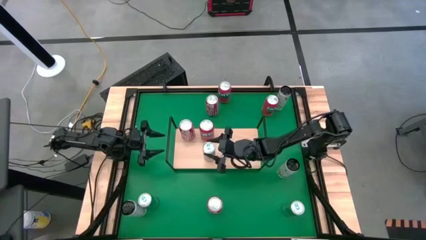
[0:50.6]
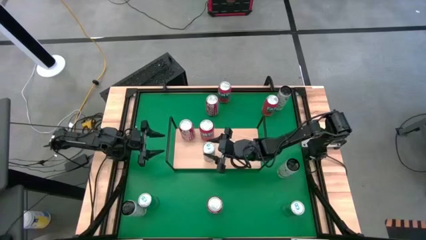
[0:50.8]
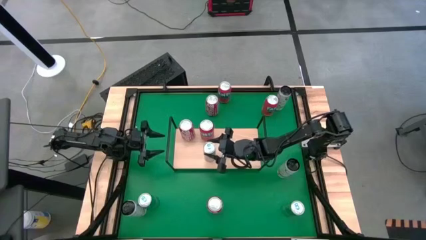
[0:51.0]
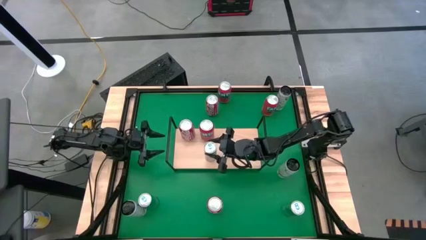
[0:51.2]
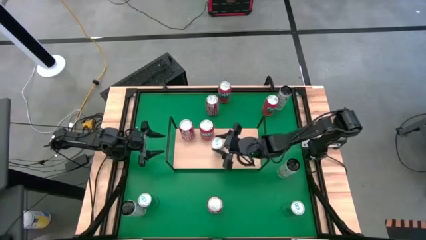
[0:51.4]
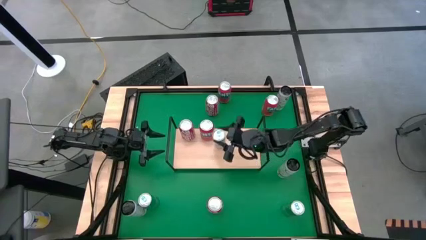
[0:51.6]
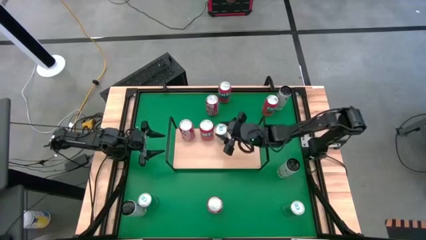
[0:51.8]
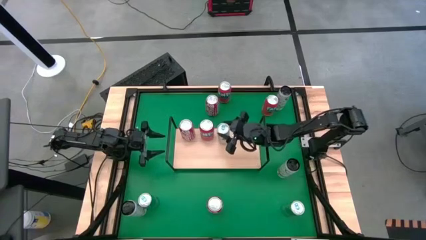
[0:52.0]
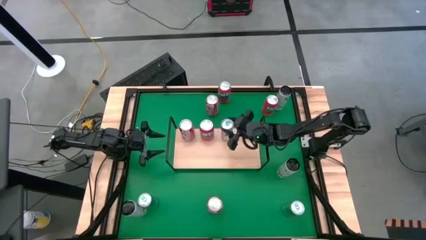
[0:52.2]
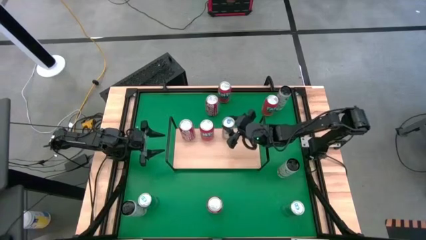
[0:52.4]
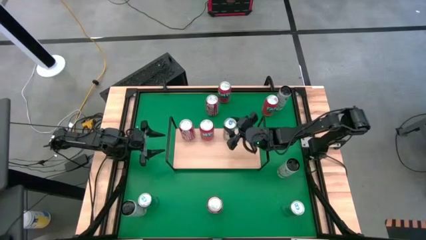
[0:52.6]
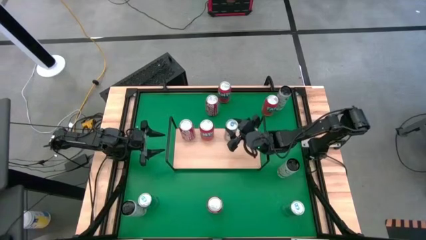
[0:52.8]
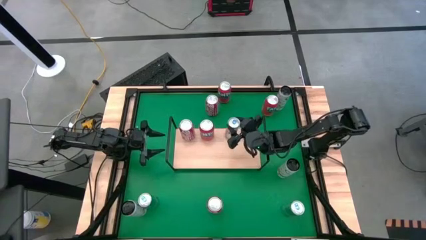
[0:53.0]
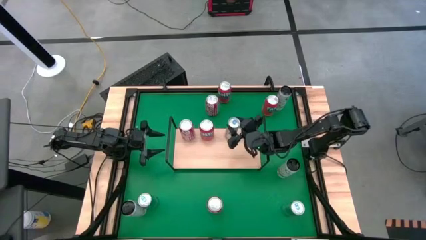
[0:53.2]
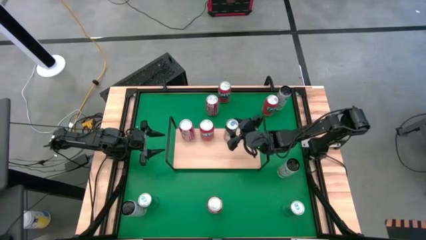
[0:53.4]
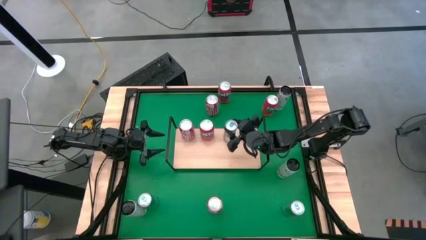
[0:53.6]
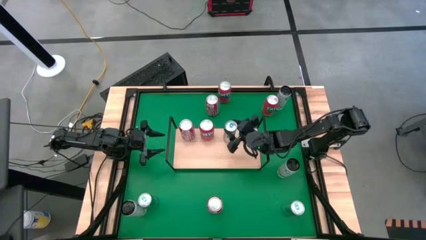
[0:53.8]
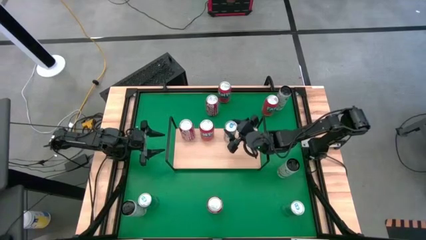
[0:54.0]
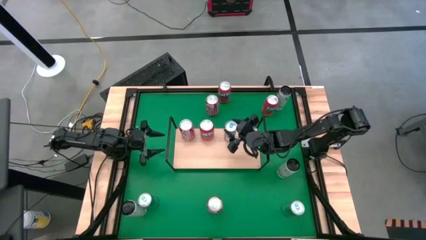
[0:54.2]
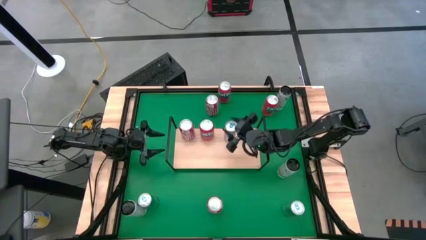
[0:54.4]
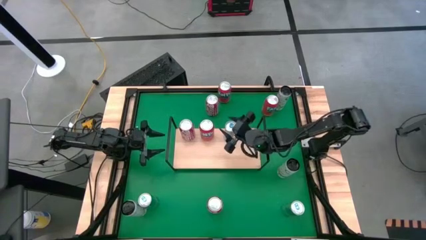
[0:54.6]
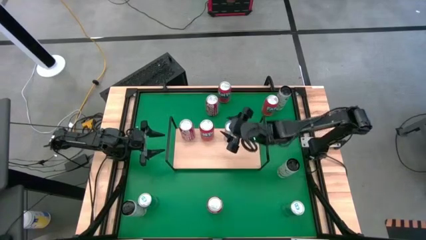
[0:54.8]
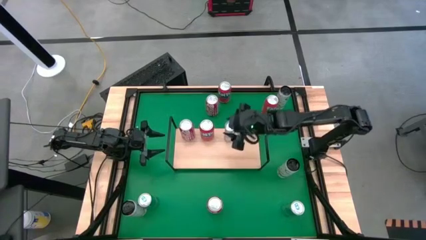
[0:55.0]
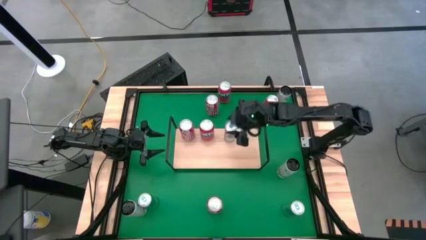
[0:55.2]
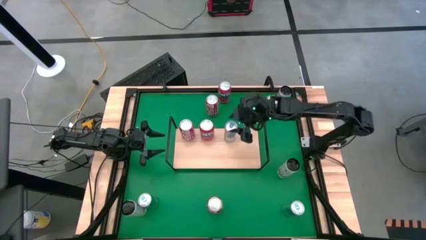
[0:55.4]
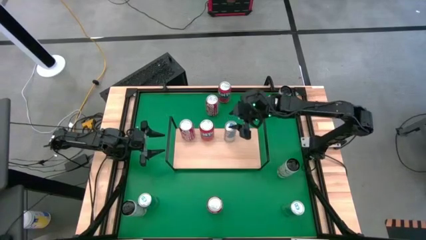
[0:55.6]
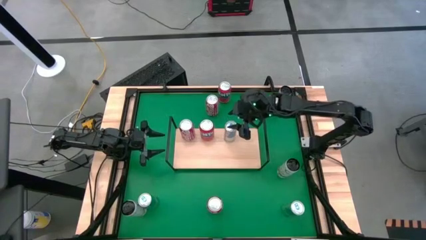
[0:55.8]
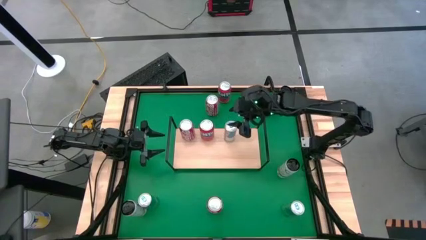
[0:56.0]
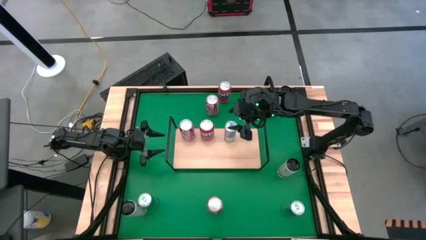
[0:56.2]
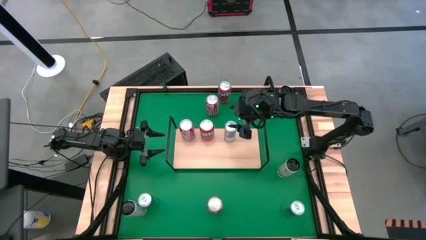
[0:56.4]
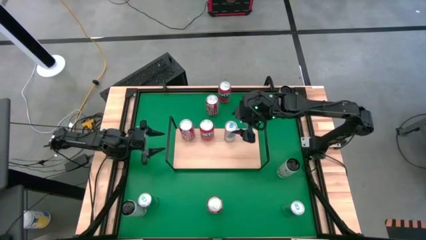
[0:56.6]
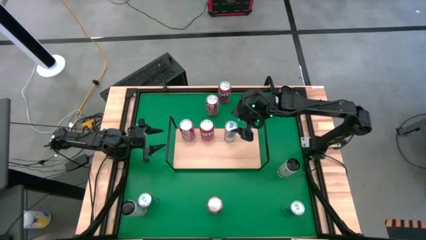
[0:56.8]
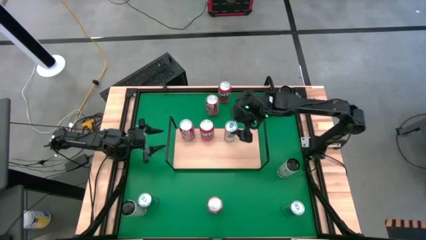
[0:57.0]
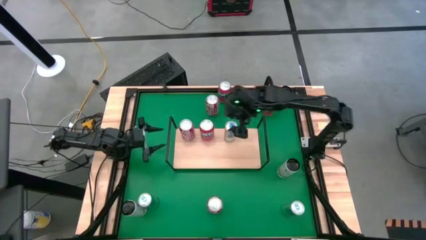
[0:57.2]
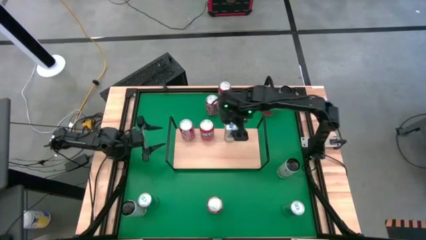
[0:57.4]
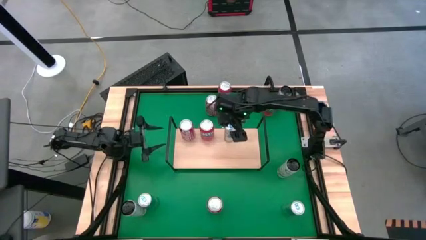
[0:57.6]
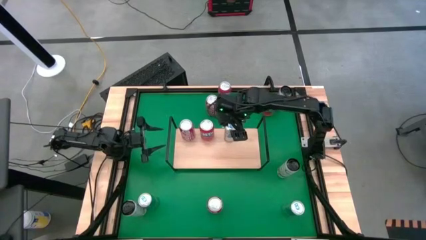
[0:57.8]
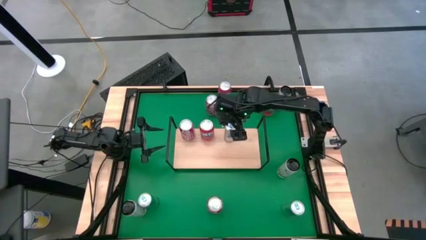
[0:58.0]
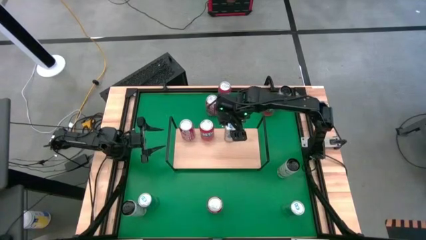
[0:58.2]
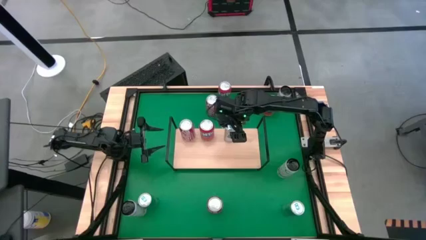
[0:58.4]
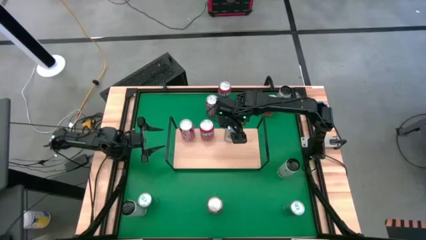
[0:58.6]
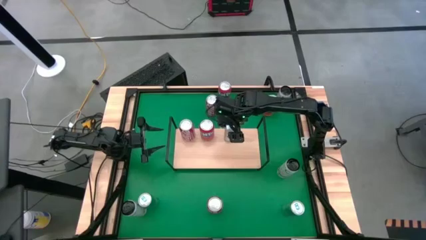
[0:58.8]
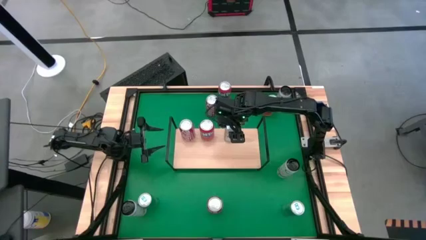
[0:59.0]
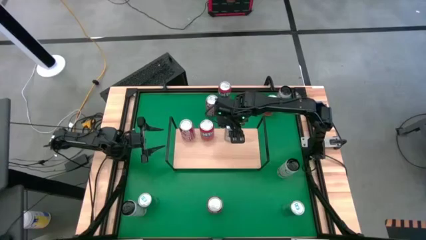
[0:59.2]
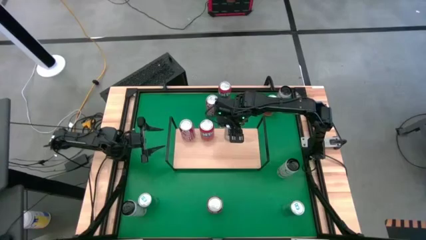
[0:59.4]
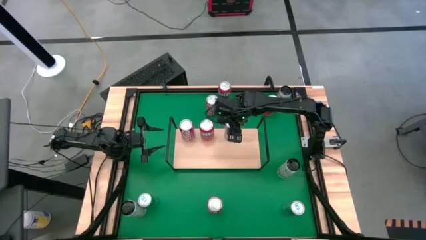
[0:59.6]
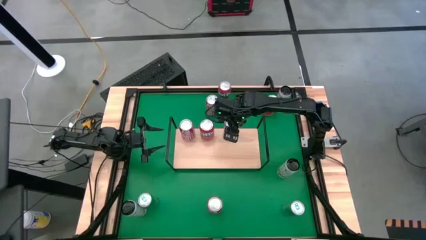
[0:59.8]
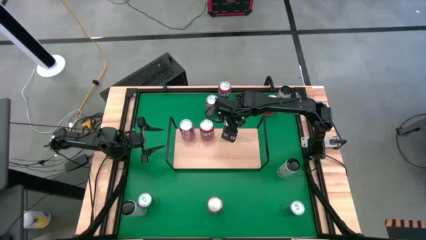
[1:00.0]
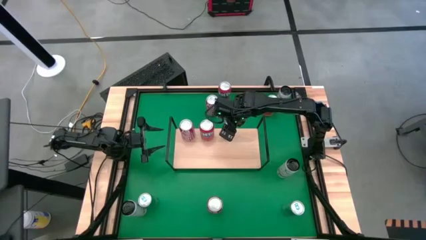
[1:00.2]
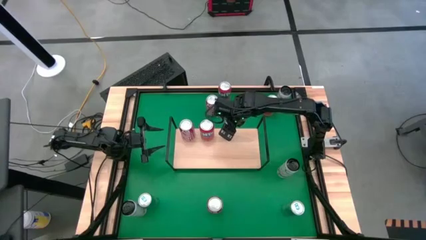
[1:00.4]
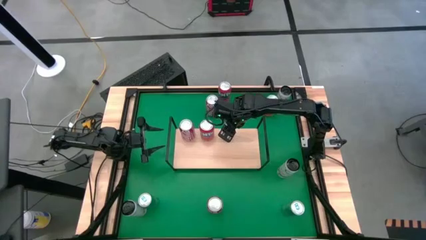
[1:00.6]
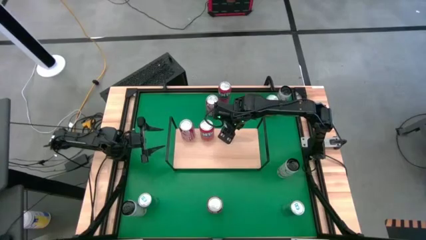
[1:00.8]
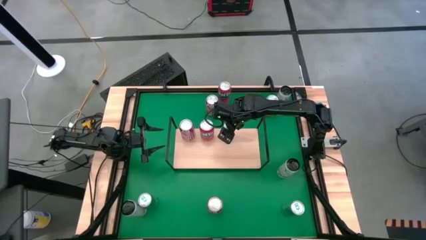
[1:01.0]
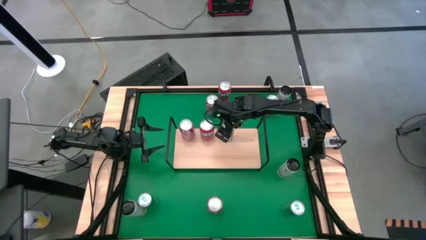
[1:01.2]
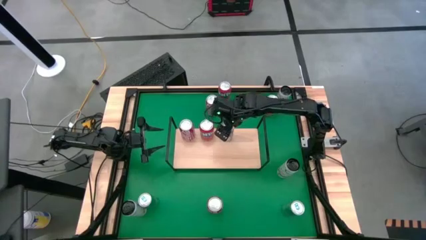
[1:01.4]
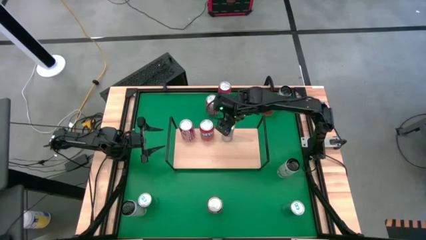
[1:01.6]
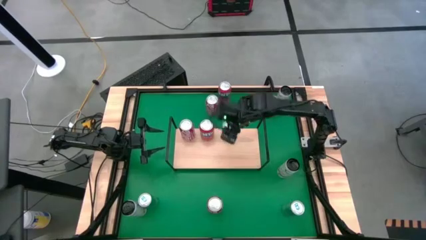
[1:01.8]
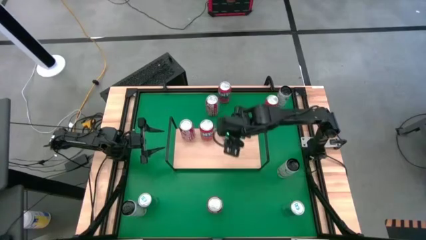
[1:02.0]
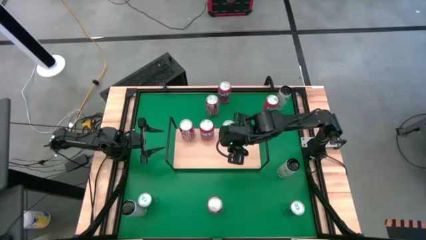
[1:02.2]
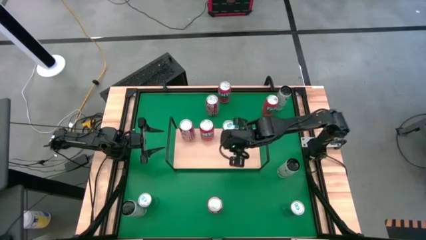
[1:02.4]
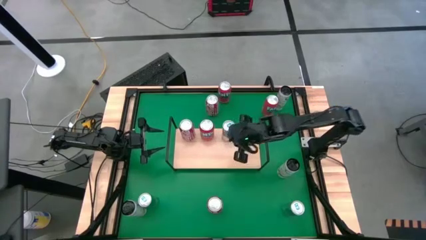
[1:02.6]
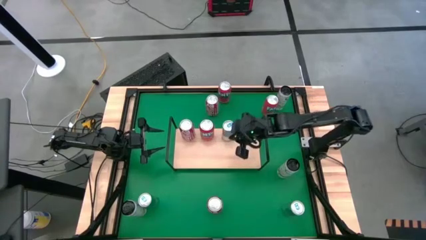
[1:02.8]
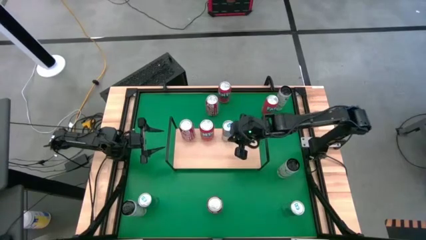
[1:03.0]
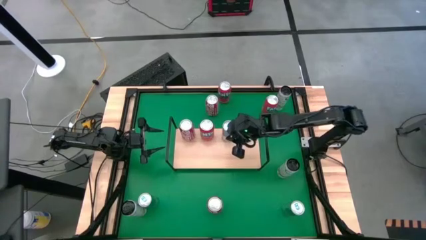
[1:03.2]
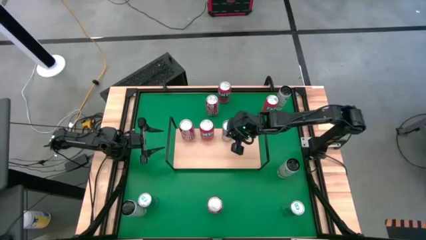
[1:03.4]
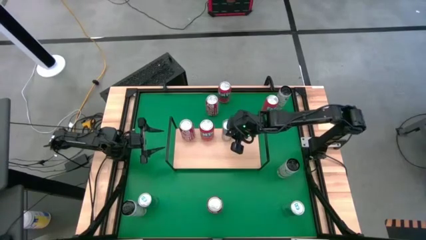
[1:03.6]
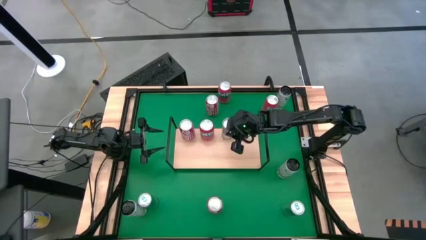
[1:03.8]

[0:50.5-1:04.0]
Task: Place canned beverage on shelf
Put the top left blue soda can on the shelf
